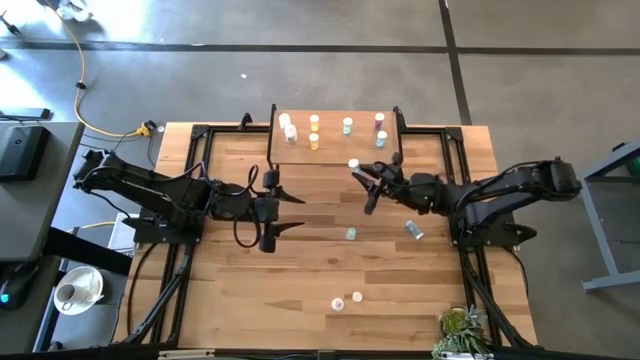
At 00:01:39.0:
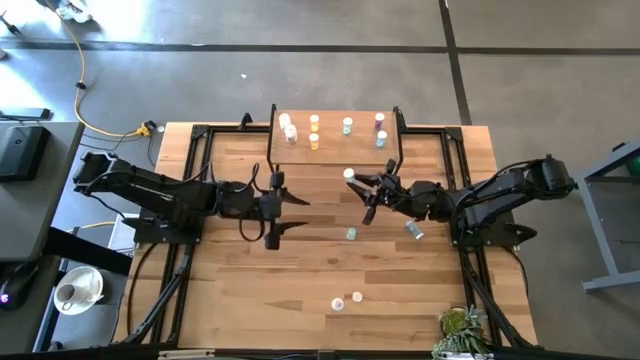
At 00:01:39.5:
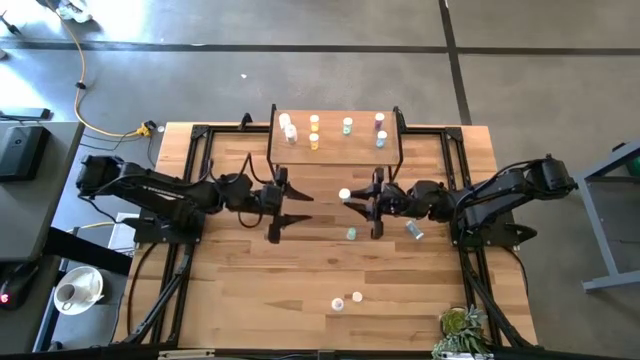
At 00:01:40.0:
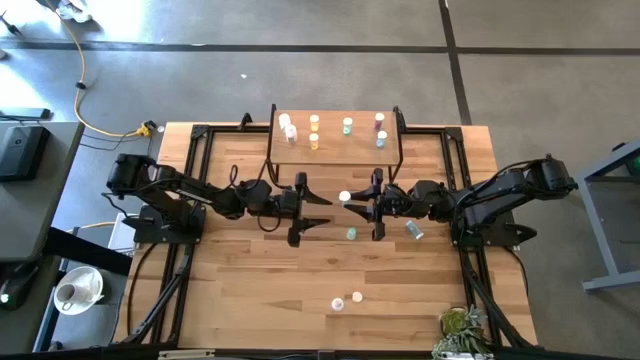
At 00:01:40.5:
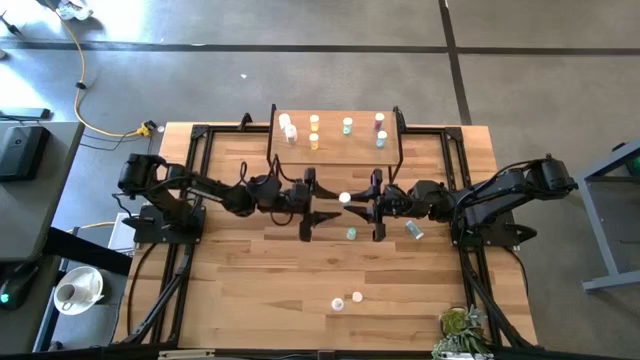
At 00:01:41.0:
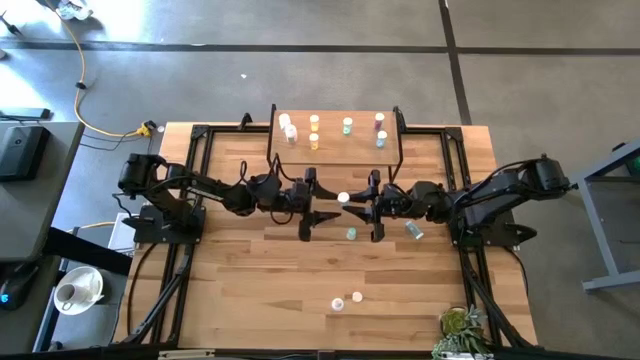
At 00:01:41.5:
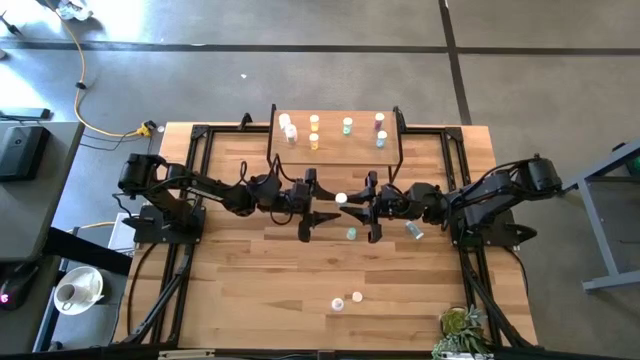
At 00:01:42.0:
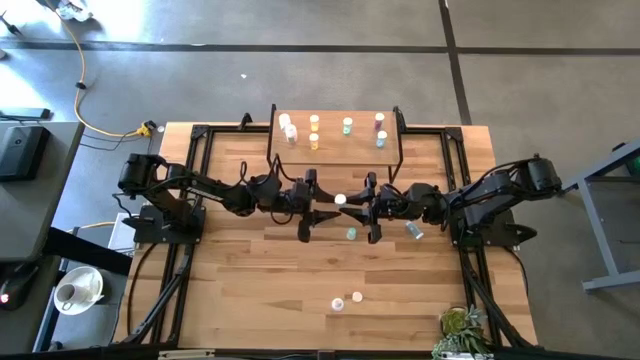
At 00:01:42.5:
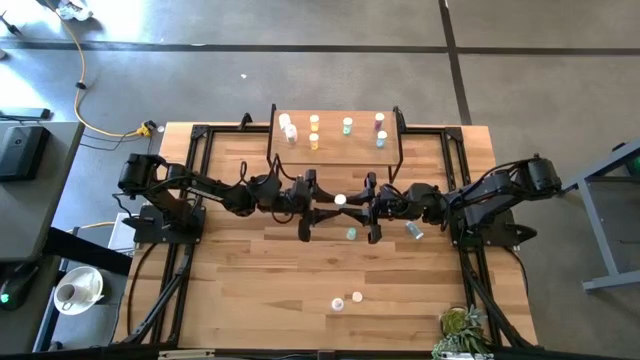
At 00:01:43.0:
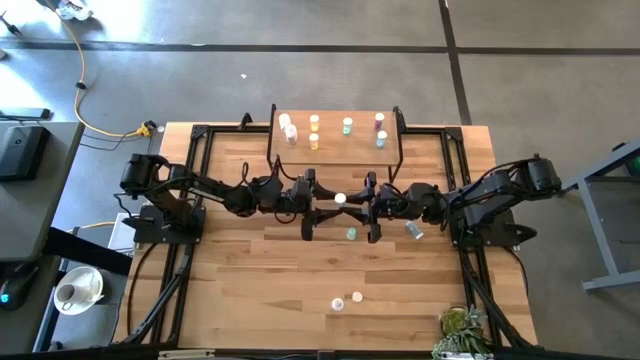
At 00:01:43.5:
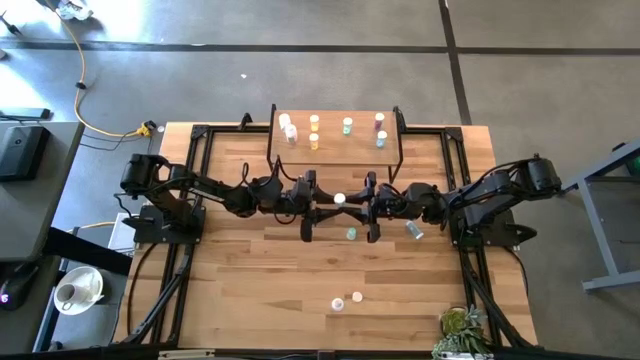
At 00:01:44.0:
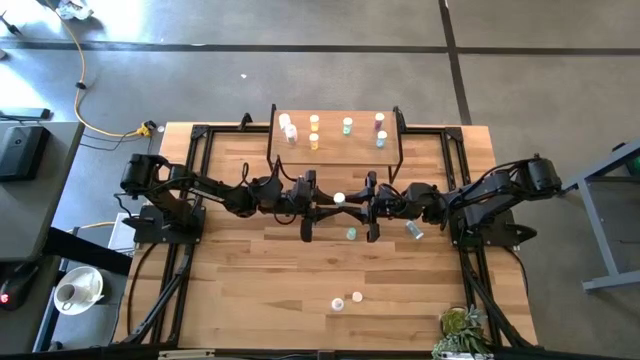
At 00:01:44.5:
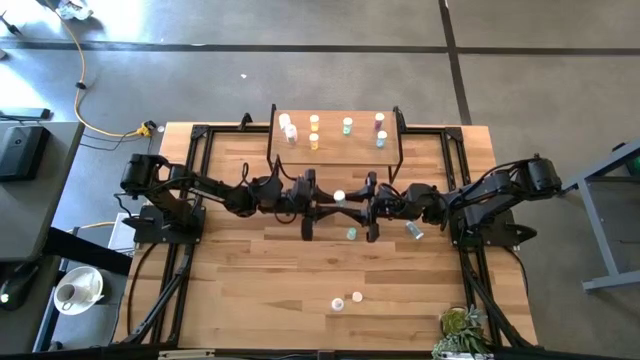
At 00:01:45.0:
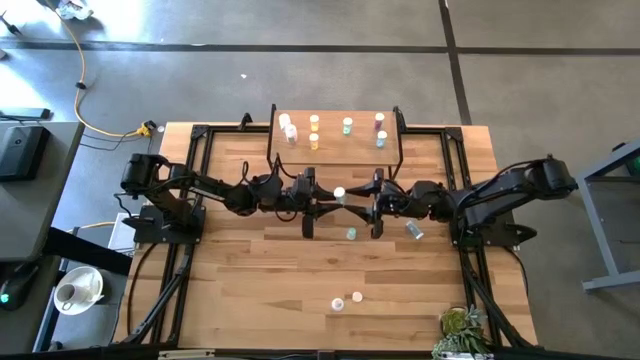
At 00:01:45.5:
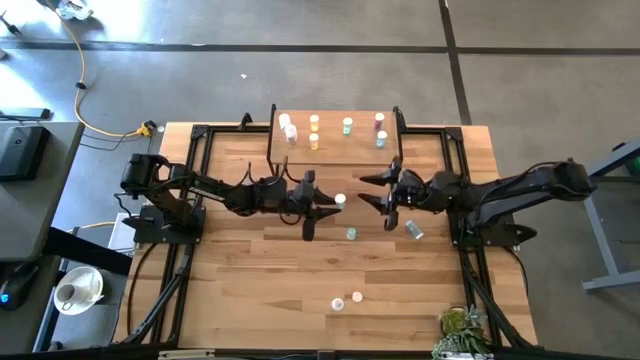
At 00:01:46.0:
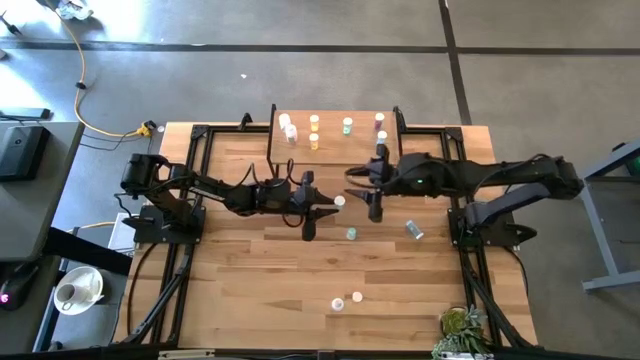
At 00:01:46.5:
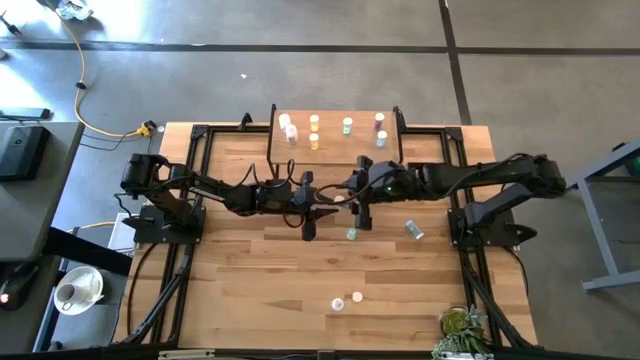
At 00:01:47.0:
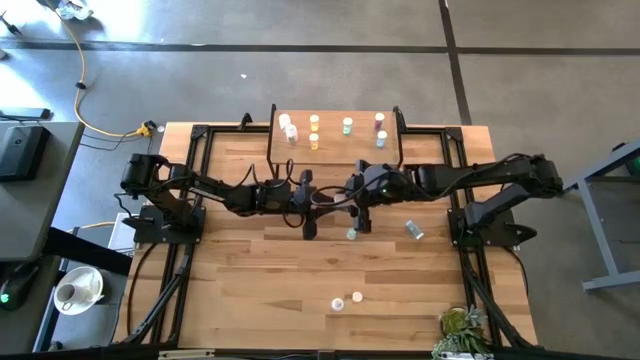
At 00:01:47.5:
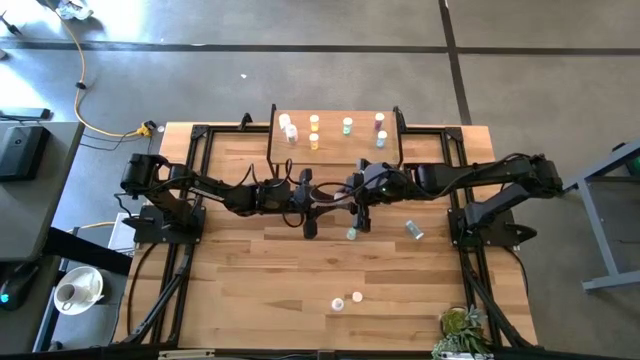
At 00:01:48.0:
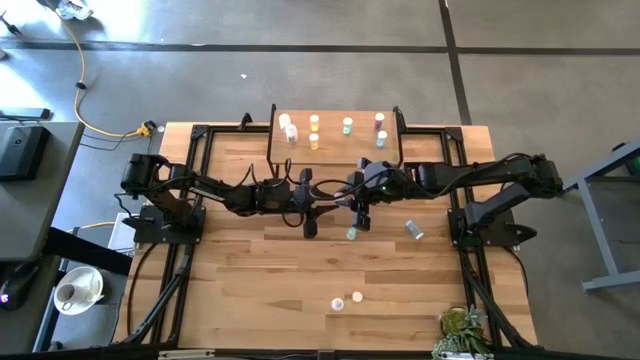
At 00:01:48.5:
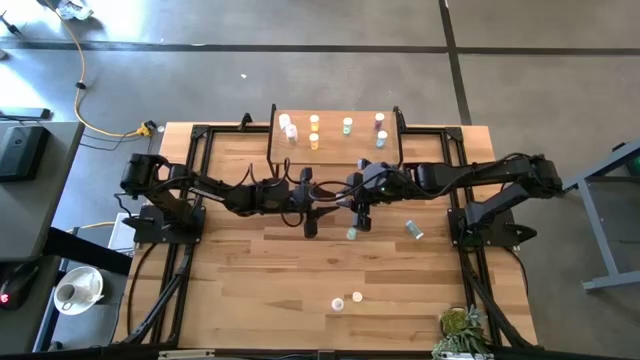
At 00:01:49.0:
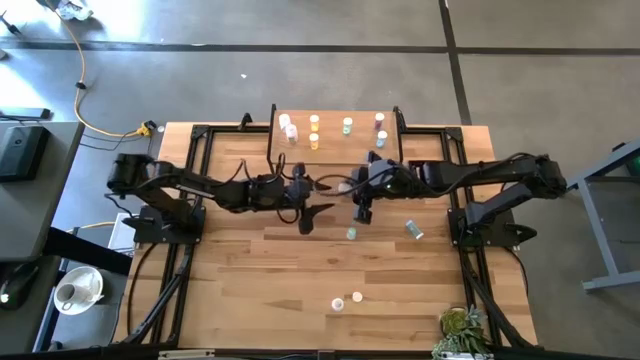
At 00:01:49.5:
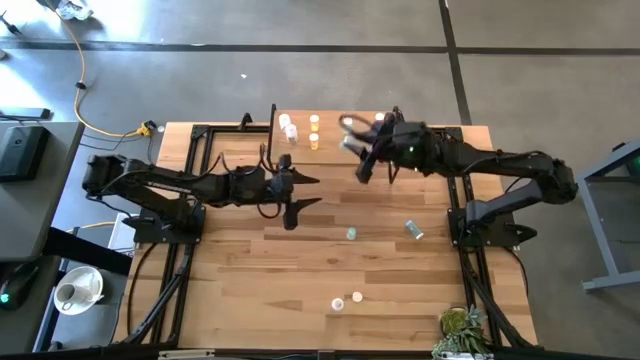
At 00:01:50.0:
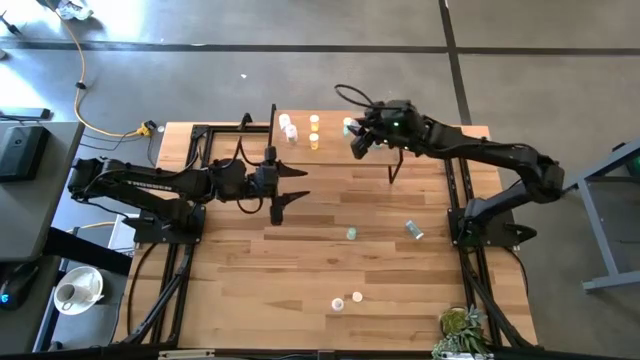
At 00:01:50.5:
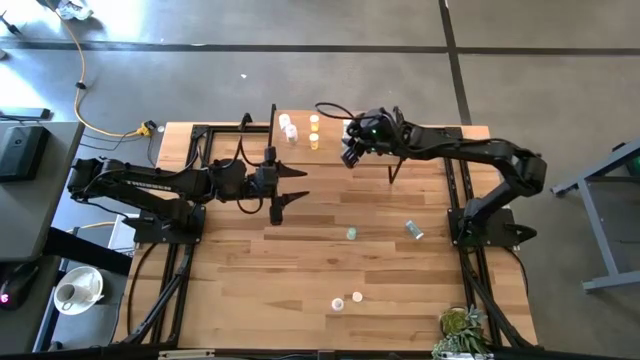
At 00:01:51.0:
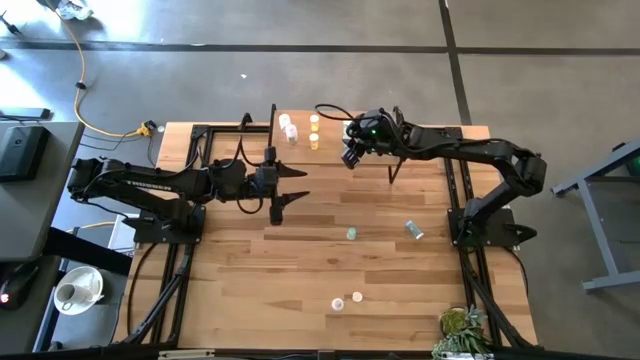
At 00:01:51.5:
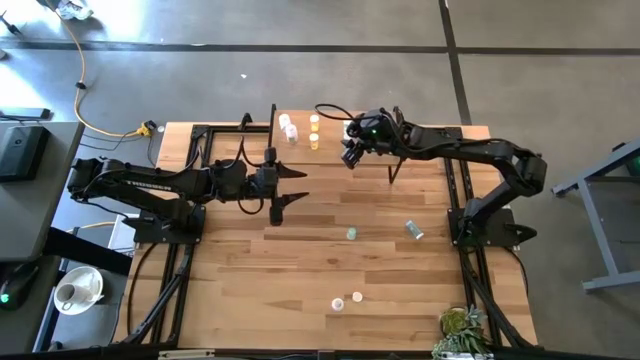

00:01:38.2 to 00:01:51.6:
Task: Pick and place medicine bottles onto shelf by color
Put the bottom green pill bottle on the shelf aligned with the other green pill bottle

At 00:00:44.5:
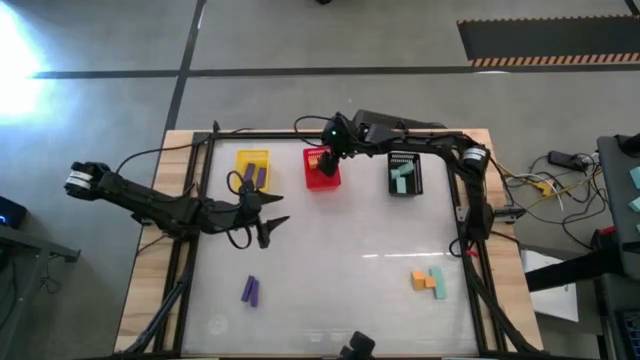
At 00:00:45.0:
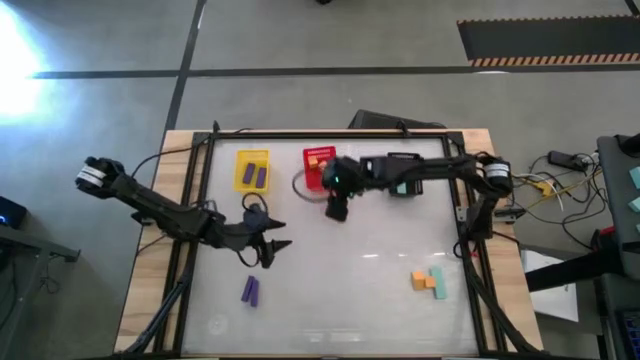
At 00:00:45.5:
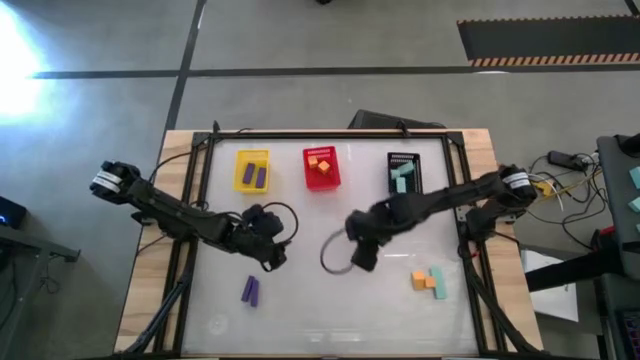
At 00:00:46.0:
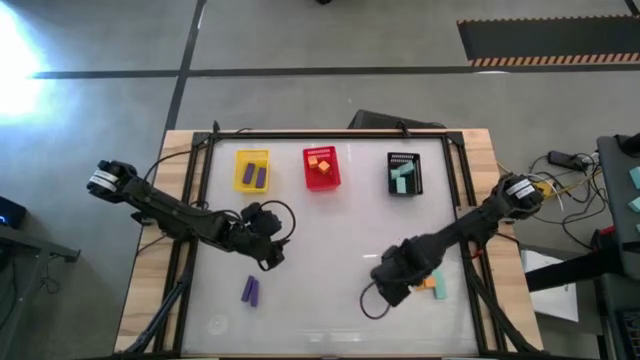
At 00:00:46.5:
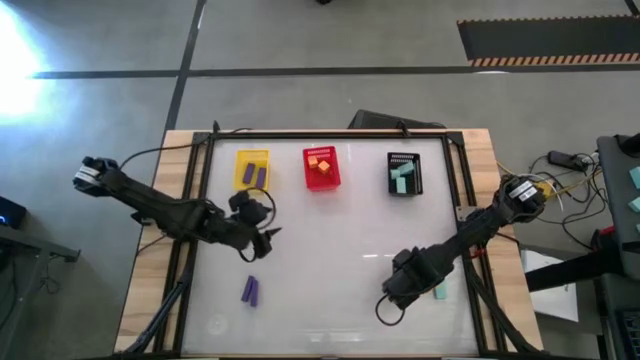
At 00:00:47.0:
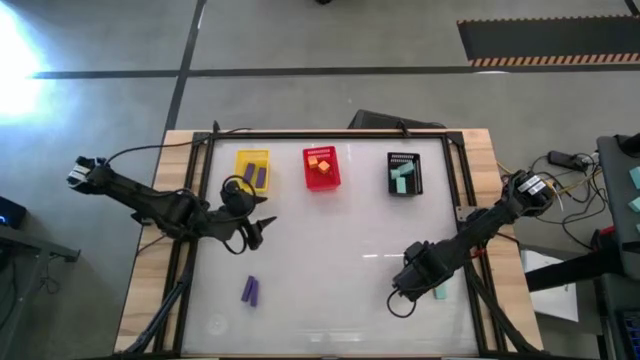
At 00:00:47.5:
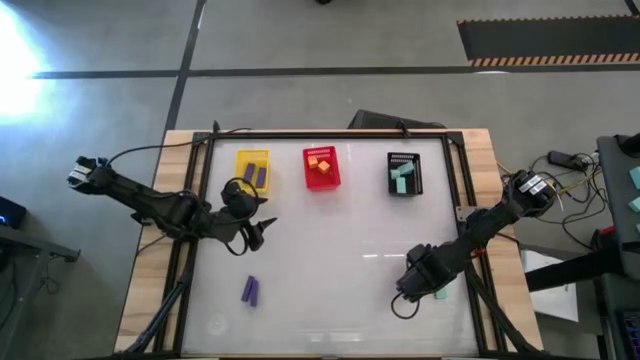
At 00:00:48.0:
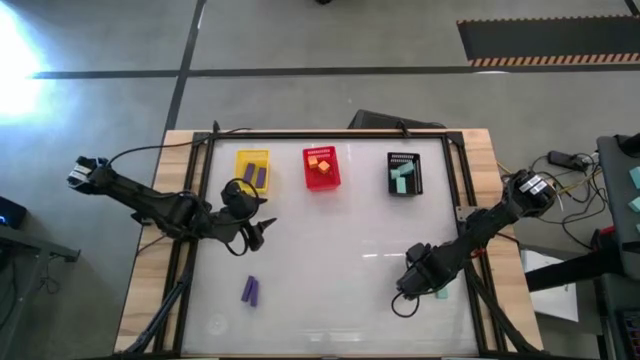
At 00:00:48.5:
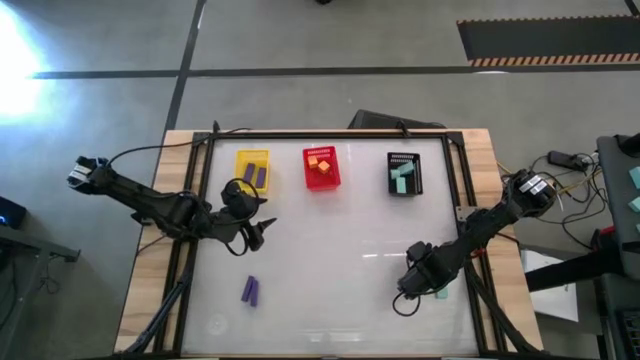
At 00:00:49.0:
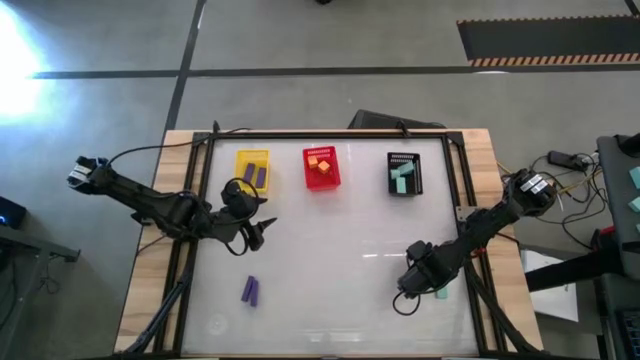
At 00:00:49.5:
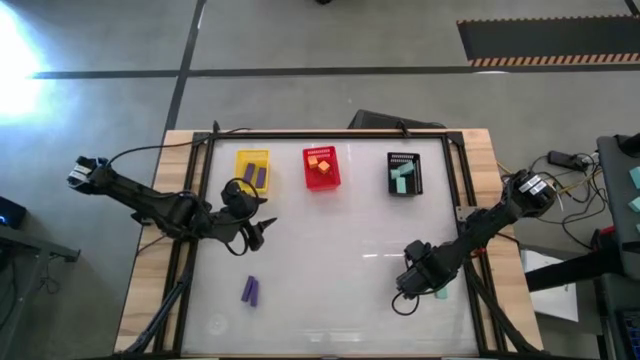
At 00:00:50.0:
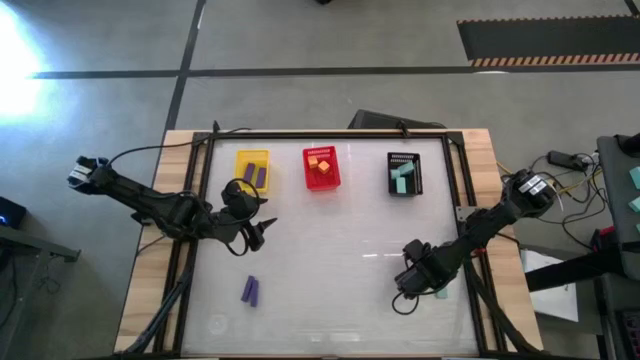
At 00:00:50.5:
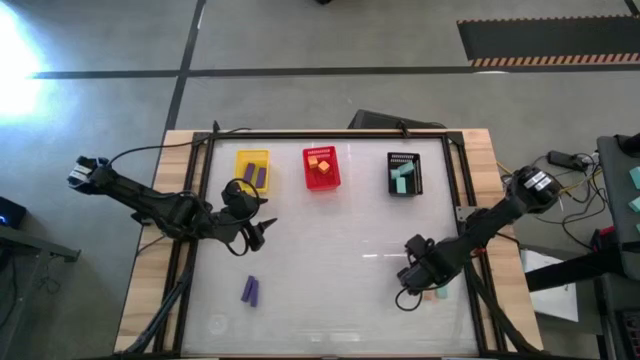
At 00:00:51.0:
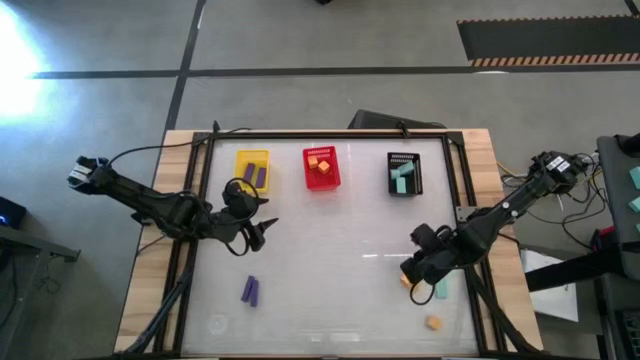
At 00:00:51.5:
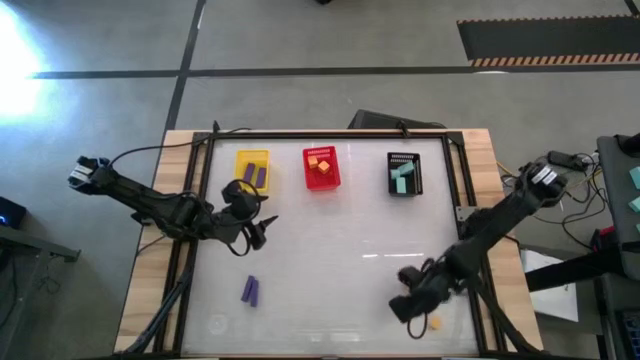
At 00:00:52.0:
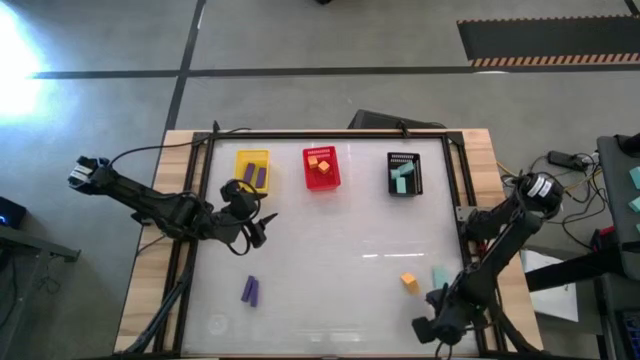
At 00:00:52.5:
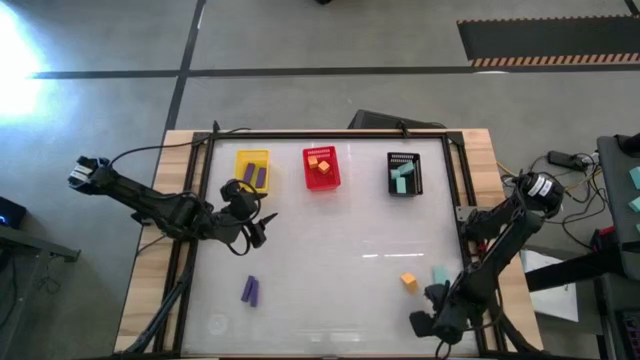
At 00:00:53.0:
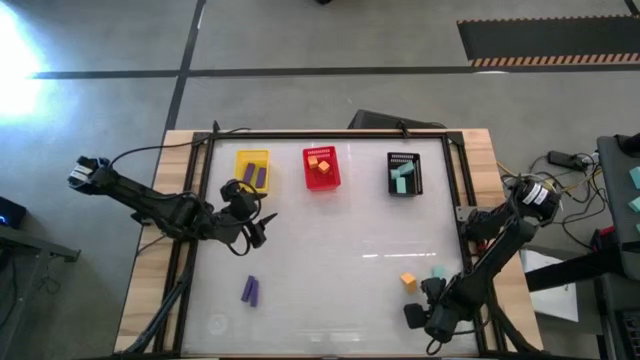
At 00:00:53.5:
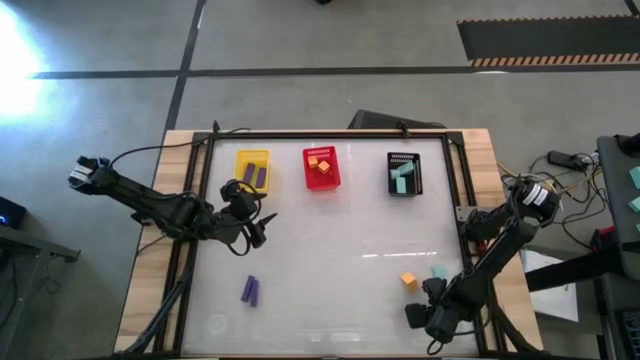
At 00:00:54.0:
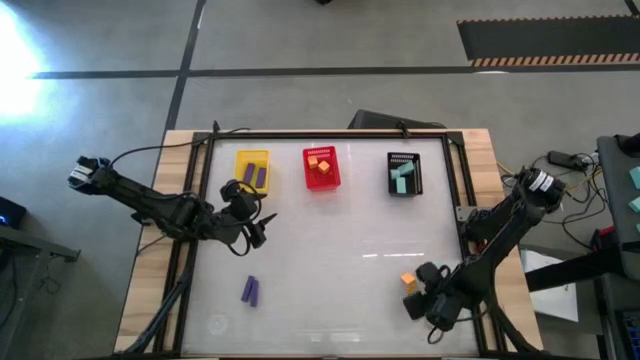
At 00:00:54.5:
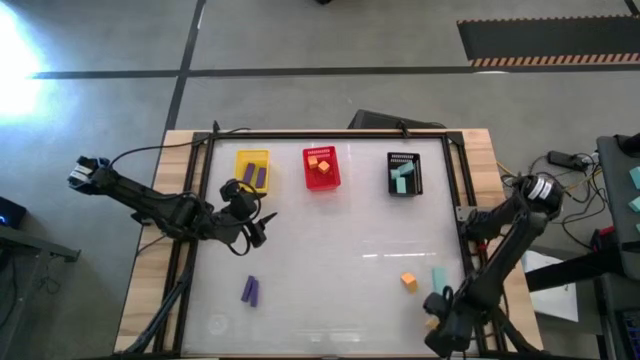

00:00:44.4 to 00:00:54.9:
Task: Sort & place blocks by color
Put the yellow block into the red bin
